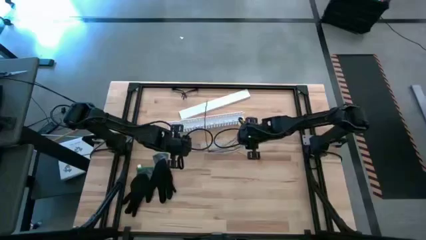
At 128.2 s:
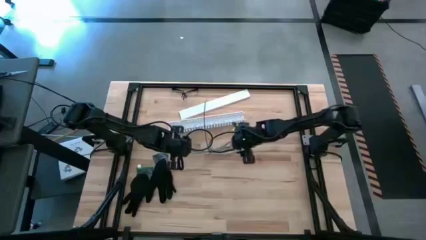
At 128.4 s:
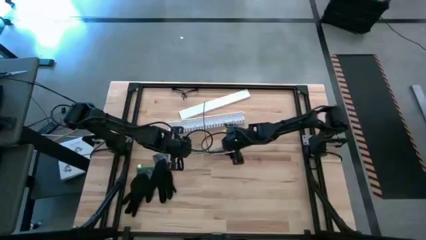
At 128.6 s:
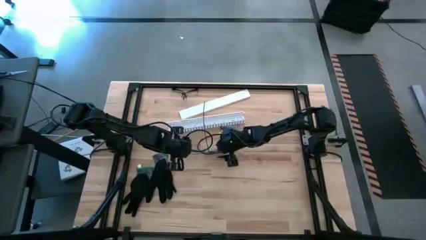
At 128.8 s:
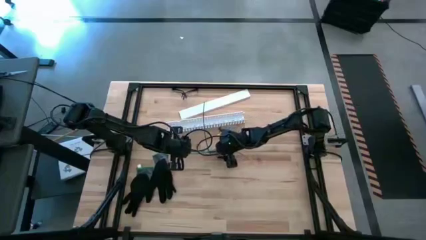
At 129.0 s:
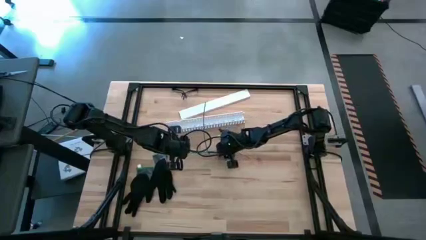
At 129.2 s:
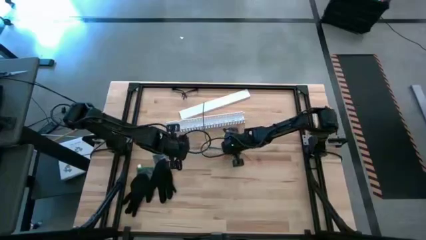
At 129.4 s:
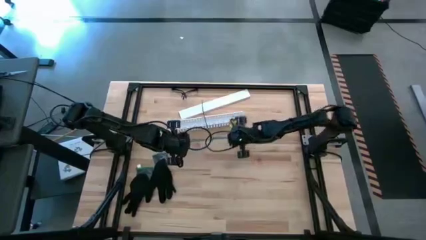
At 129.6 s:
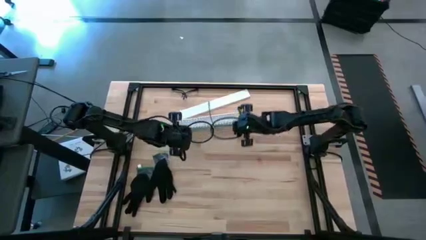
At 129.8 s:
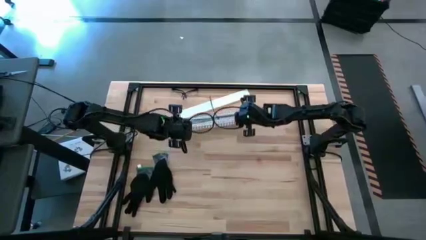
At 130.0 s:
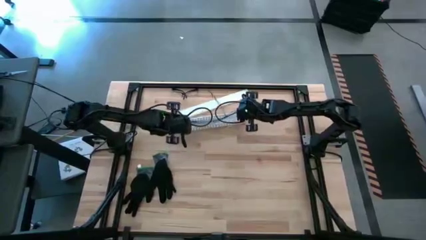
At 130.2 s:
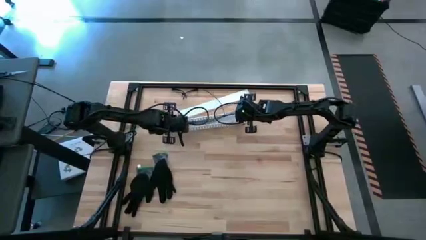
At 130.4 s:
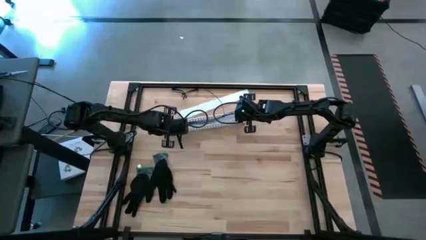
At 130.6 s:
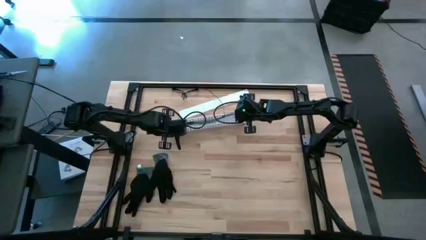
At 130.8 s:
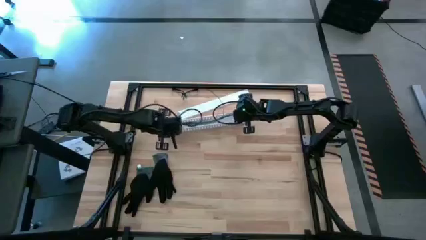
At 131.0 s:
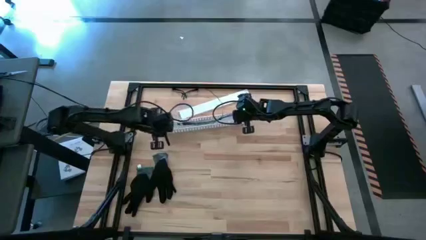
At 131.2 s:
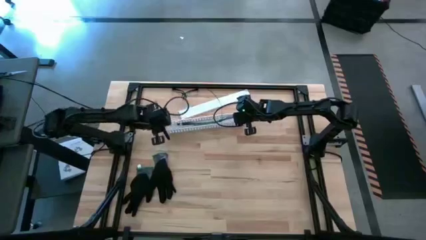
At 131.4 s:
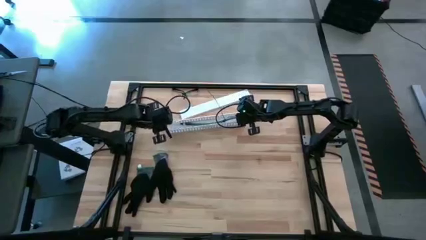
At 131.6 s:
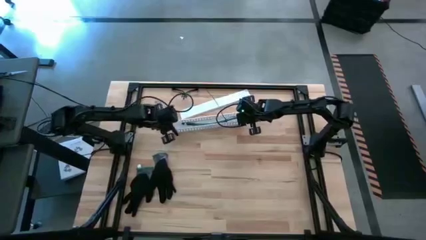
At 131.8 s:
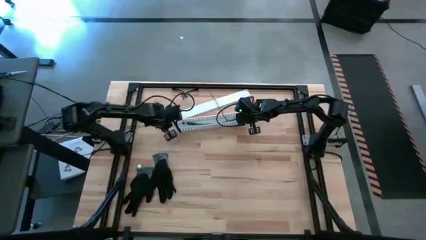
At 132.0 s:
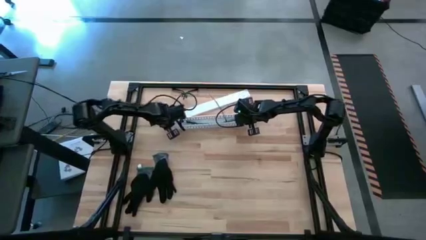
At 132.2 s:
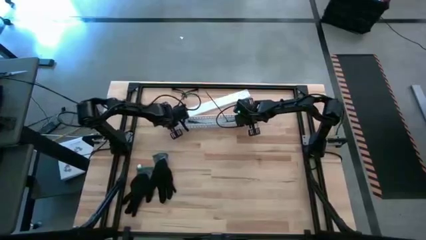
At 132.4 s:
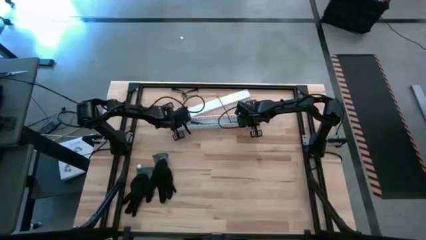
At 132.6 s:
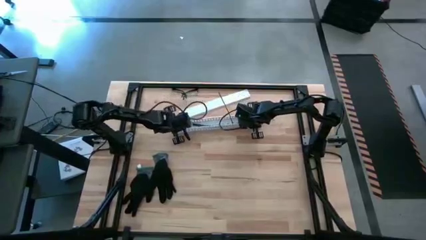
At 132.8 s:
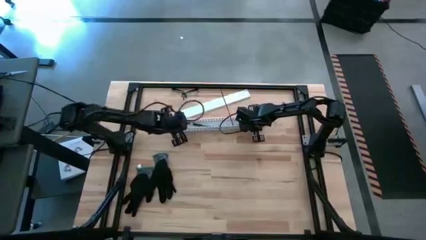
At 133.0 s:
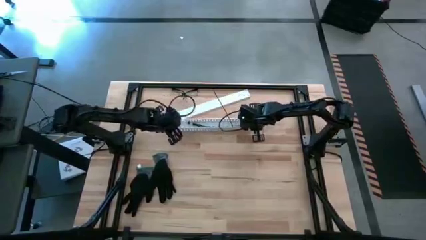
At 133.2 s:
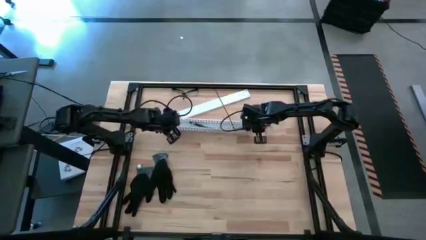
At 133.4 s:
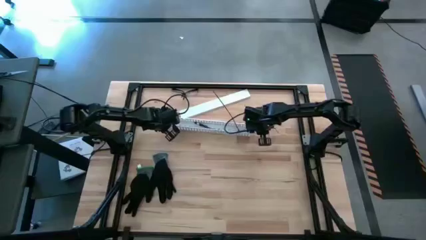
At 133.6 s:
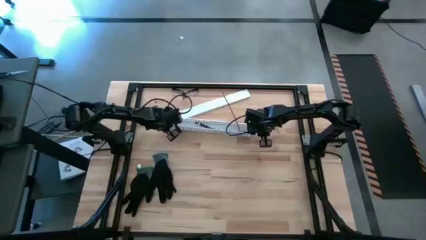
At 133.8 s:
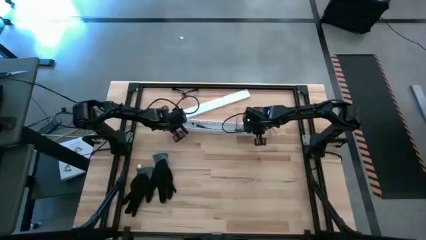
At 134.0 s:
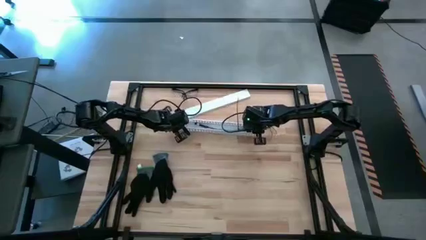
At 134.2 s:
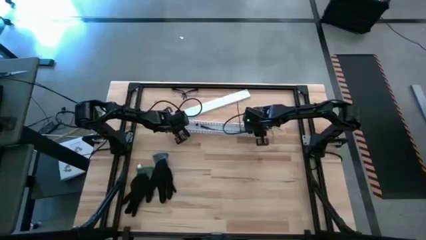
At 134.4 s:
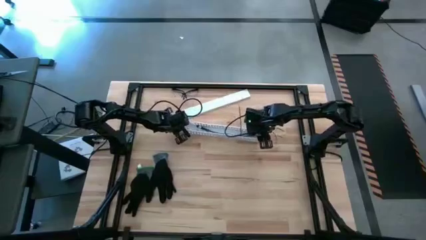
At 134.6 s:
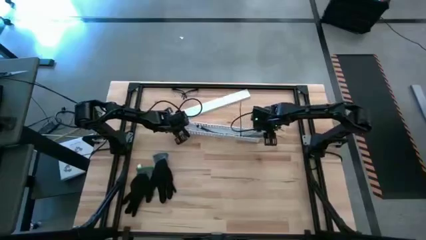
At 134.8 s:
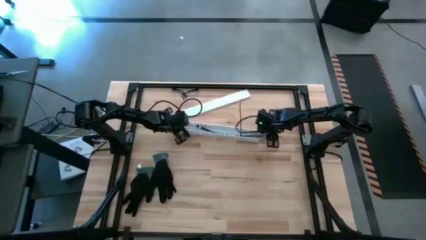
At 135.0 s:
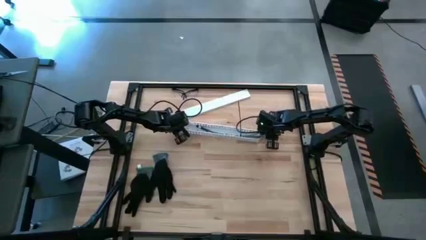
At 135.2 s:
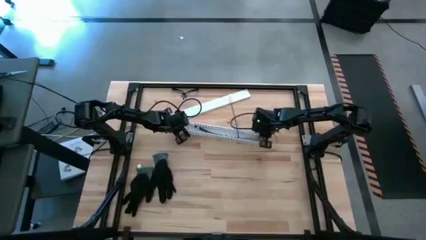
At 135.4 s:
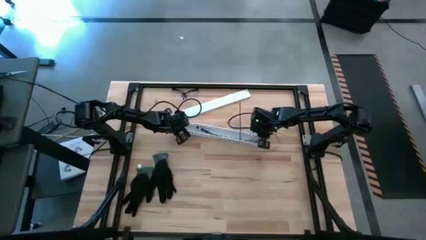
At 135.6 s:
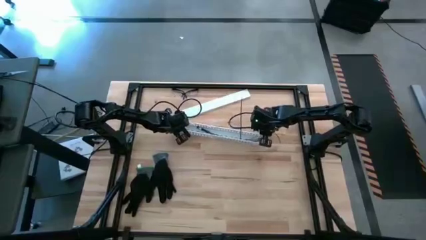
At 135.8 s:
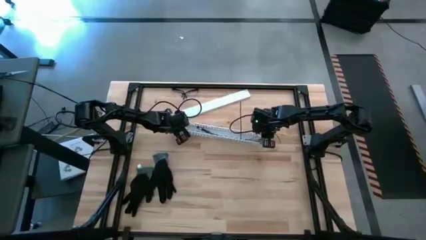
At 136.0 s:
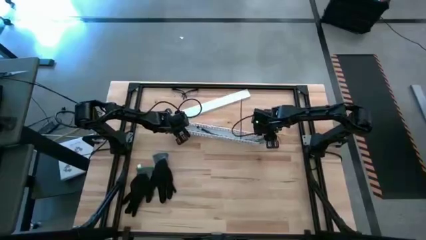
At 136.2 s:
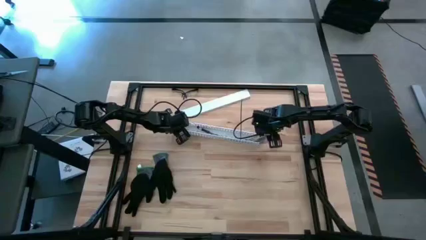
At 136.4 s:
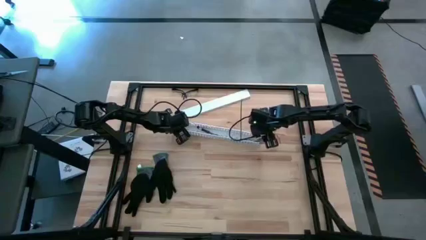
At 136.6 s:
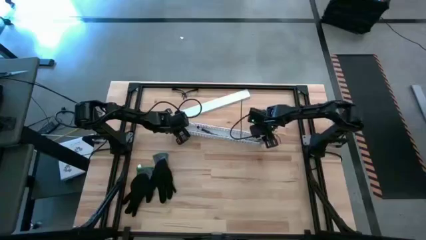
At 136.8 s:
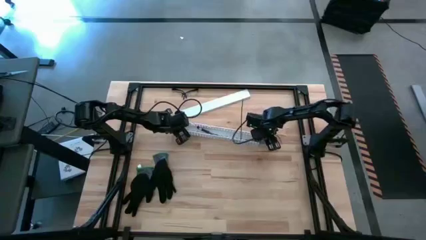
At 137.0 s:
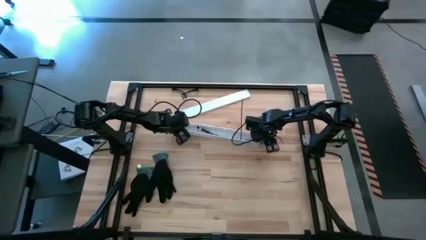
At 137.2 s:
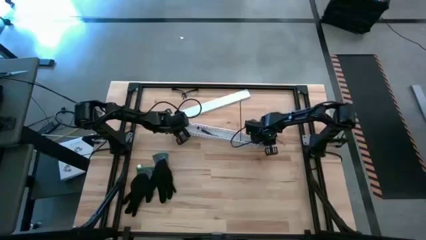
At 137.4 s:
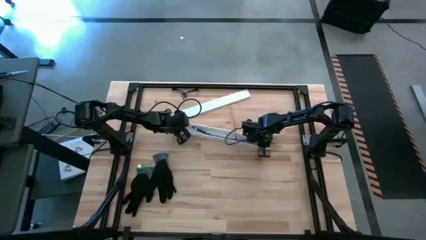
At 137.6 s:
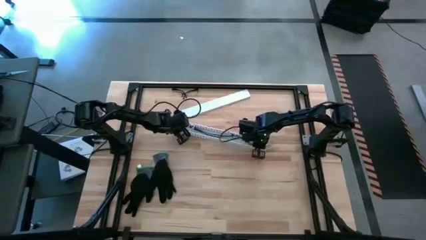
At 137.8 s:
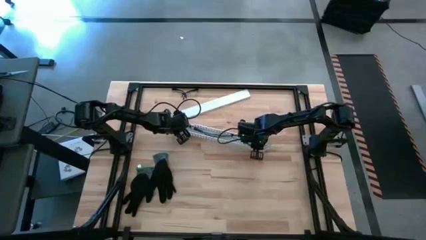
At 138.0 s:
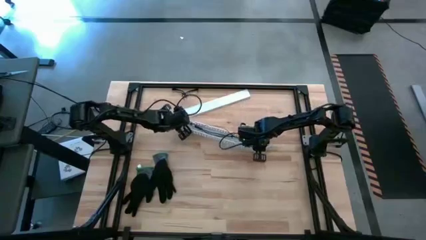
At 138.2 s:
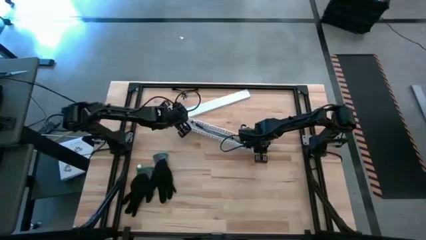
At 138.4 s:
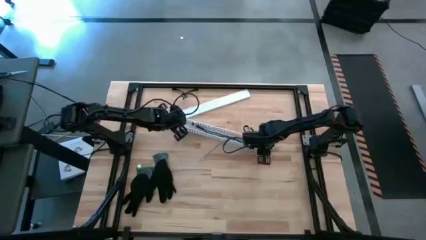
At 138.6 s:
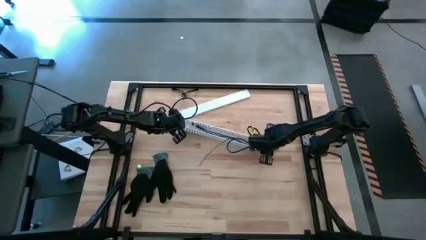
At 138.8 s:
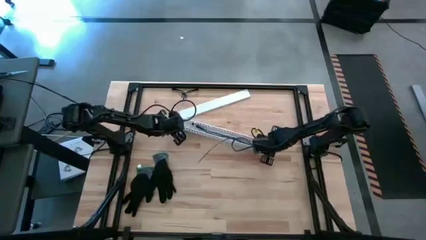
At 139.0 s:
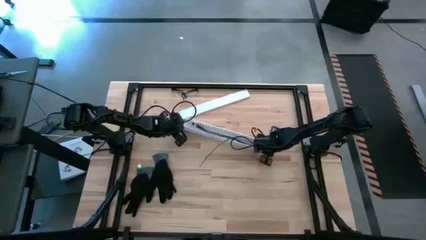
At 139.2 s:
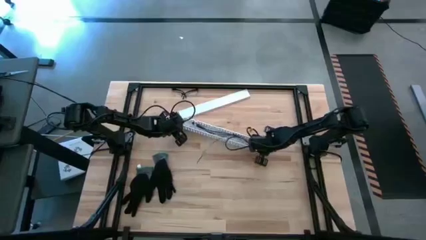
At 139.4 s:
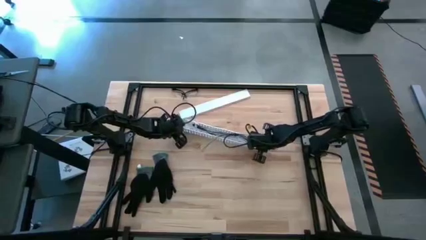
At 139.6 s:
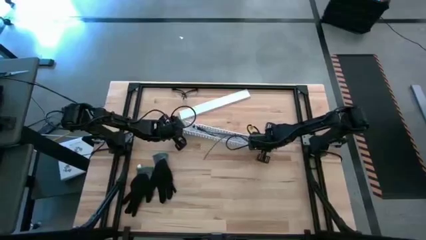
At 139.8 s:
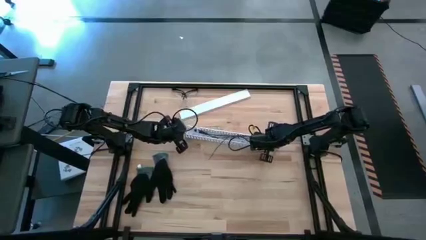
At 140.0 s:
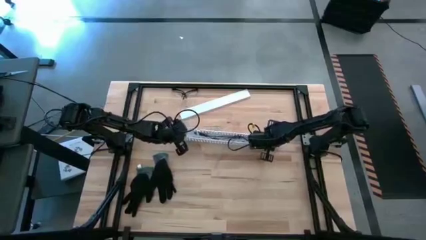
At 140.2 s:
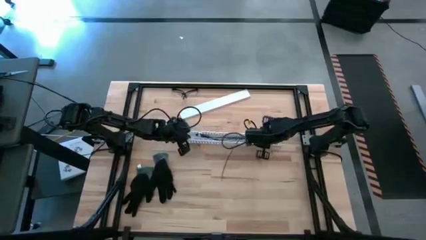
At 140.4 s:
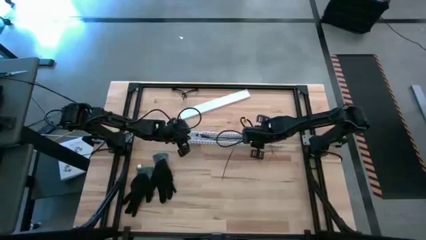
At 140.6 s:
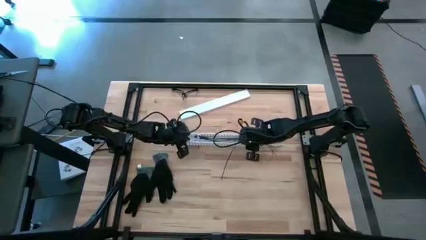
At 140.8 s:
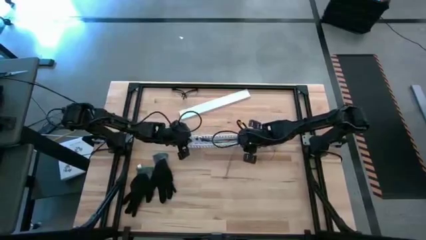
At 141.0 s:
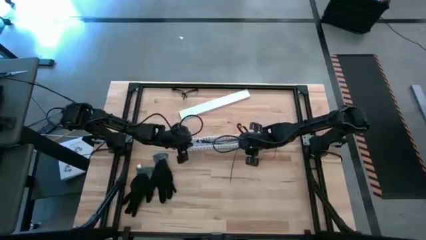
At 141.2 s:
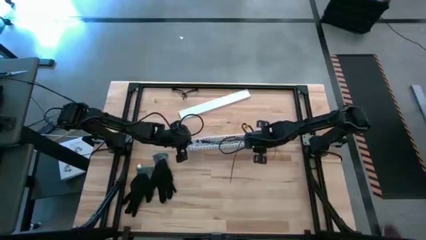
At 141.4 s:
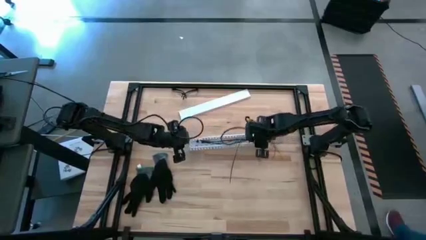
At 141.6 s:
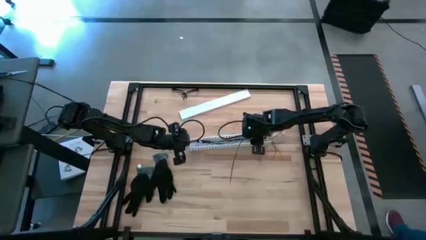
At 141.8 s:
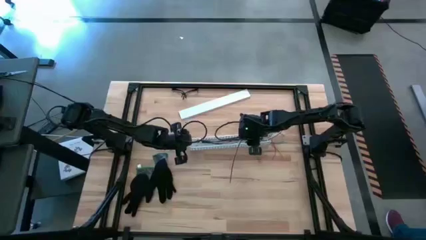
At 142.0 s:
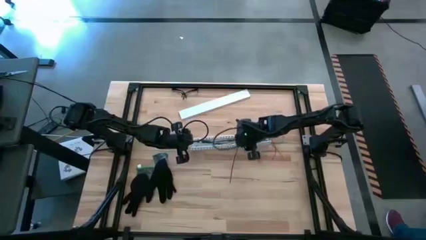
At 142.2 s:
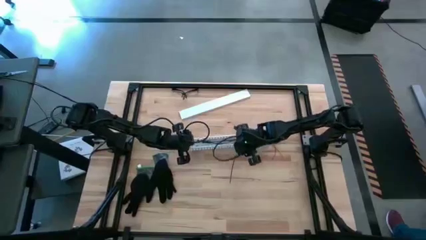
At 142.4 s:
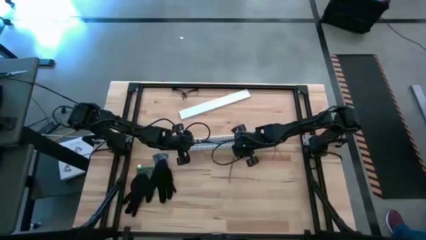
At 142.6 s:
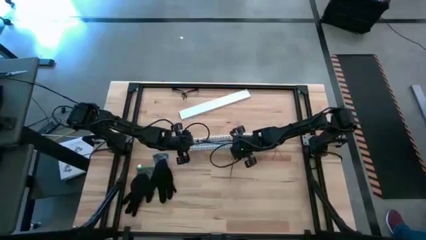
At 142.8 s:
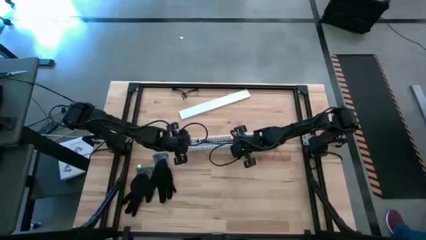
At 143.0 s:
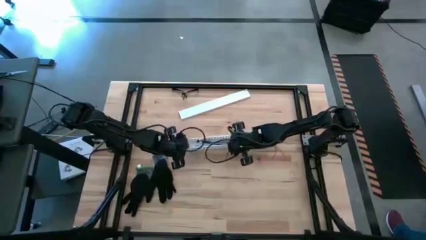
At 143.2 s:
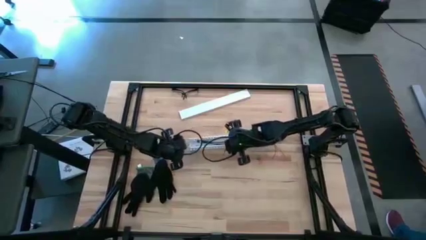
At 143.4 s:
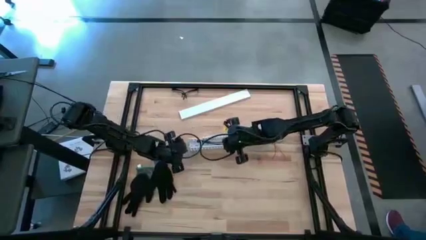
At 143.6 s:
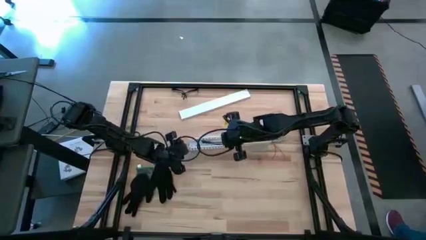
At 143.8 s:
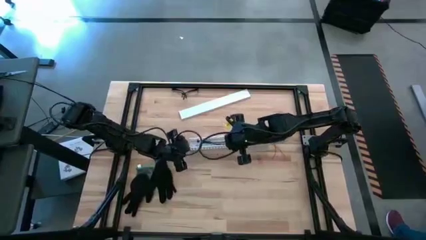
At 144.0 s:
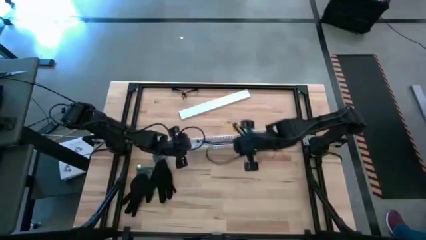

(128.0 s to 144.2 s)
Task: Ziptie cables
Put the cable into the white cable duct

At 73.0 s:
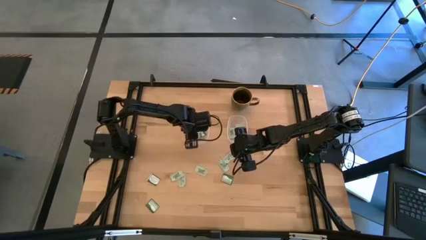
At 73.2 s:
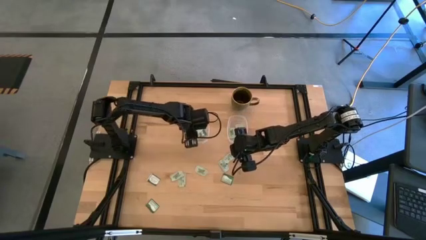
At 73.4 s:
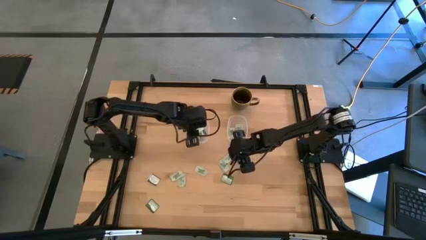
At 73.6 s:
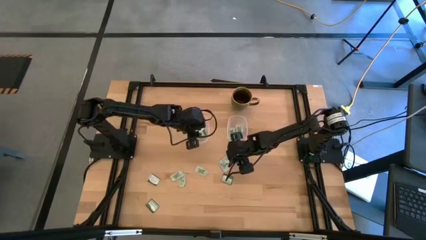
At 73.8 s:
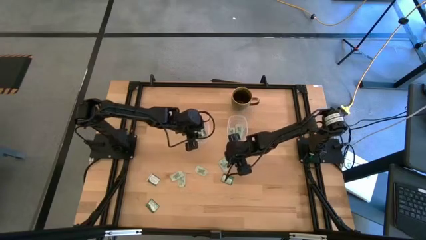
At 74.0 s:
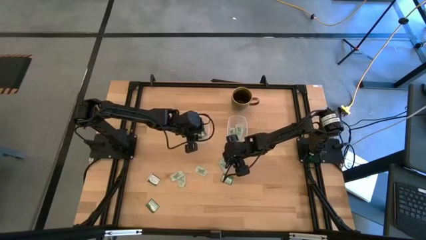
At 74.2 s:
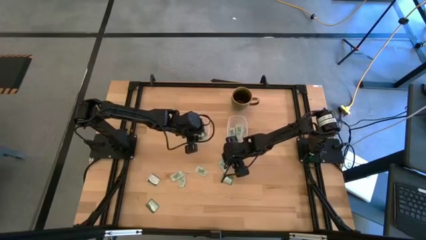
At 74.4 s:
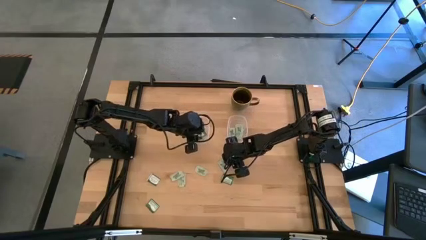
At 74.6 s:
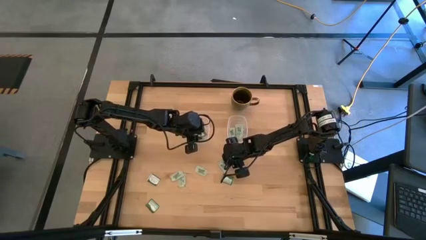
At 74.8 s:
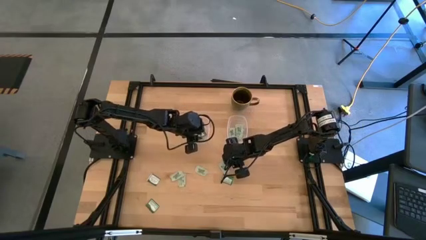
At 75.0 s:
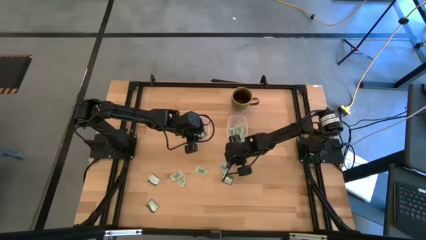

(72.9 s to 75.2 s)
Task: Pick and place items into bin
Put the stevia packet into the right transparent bin
